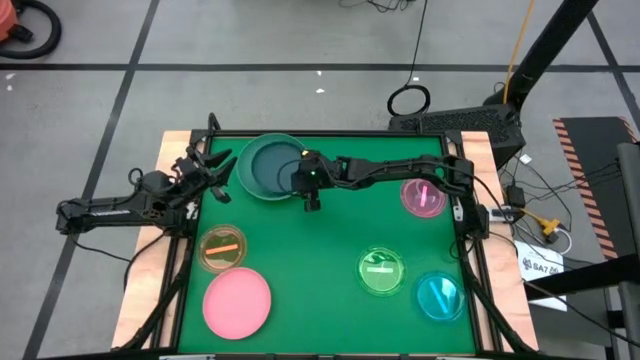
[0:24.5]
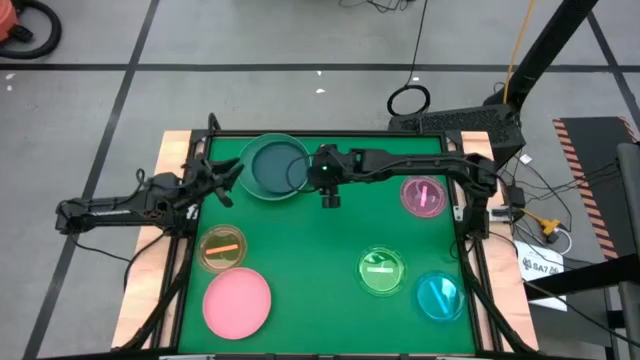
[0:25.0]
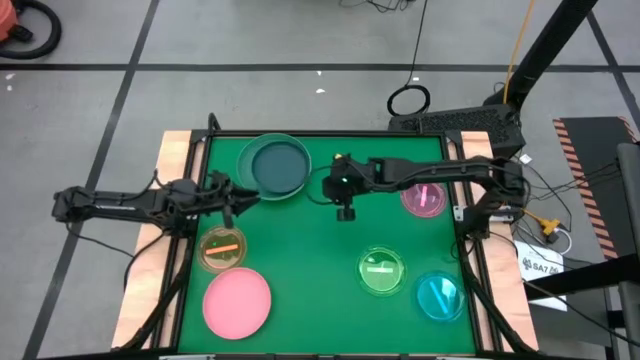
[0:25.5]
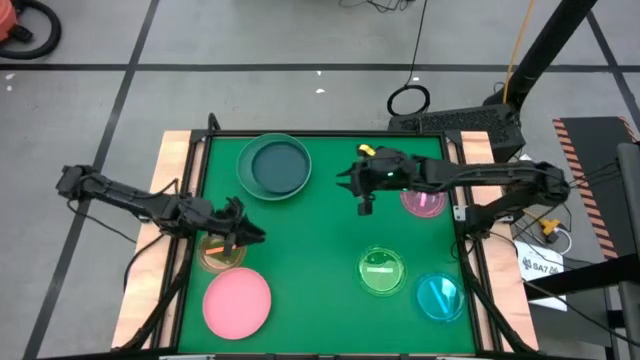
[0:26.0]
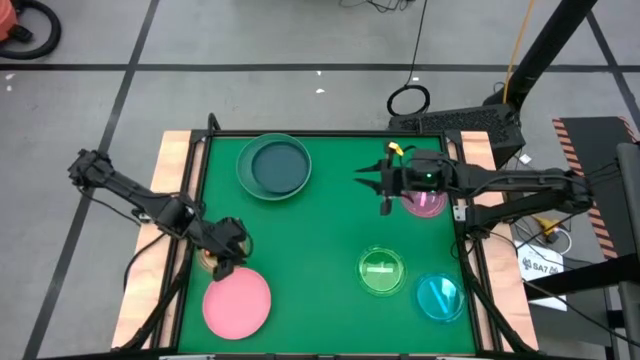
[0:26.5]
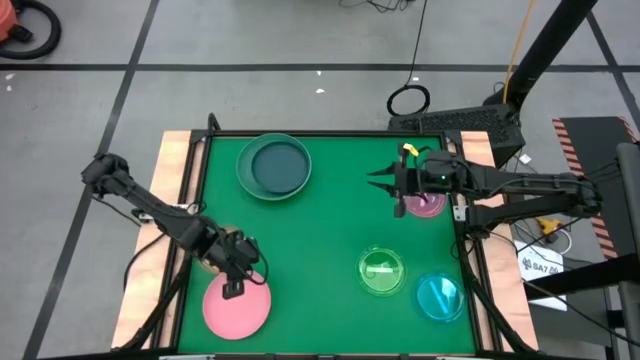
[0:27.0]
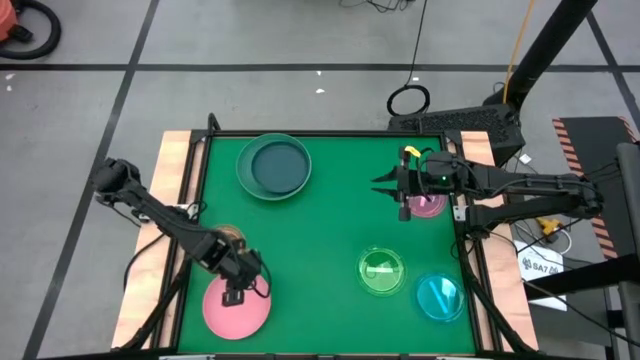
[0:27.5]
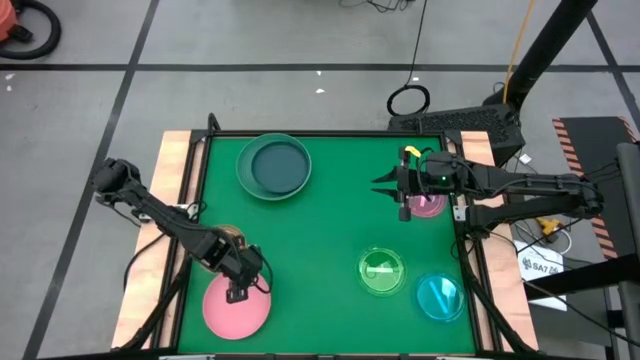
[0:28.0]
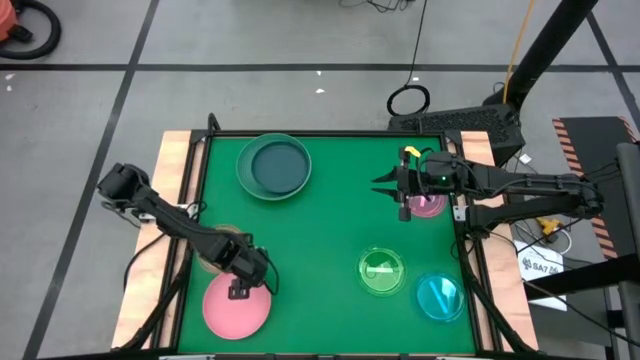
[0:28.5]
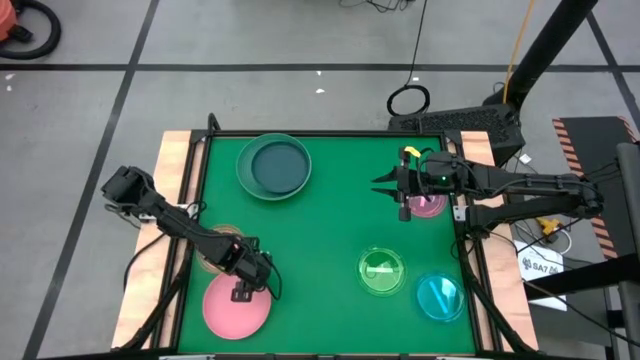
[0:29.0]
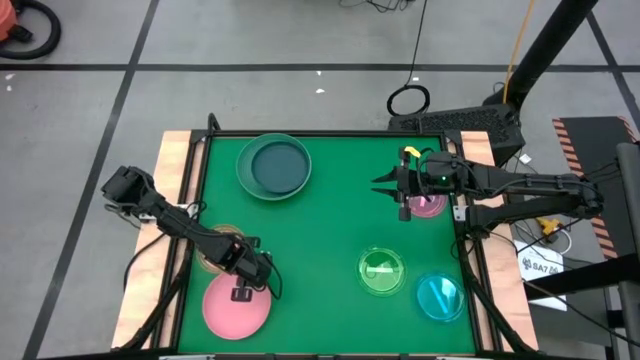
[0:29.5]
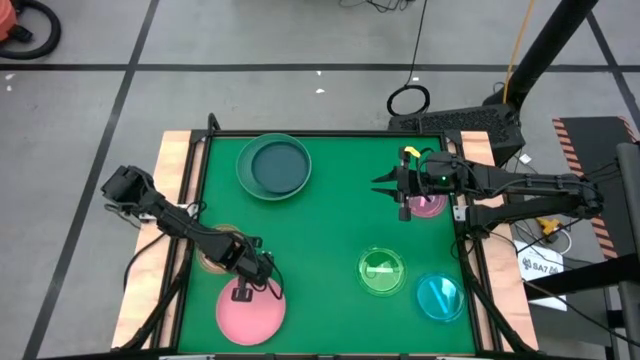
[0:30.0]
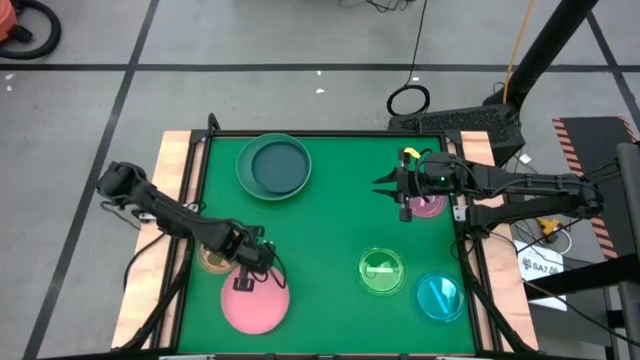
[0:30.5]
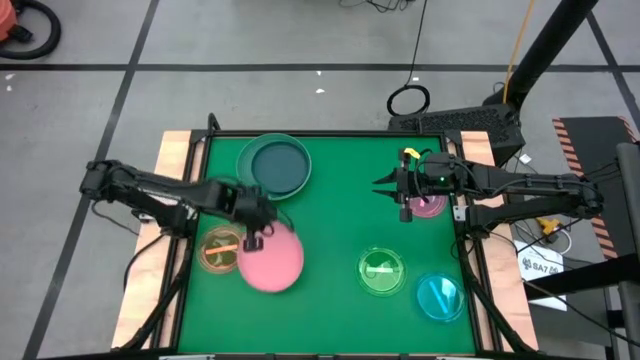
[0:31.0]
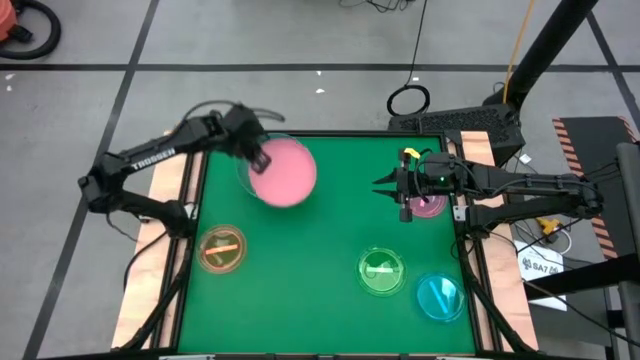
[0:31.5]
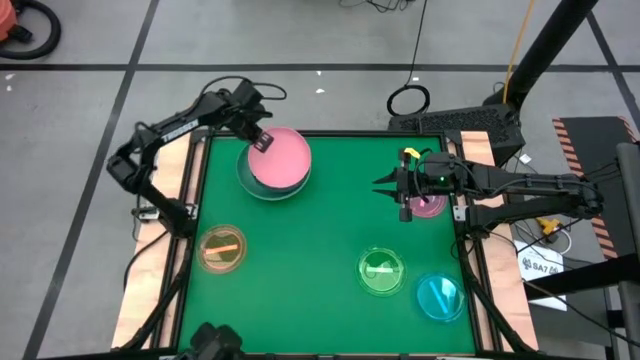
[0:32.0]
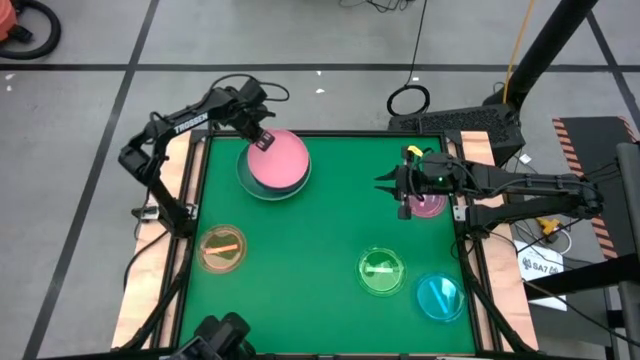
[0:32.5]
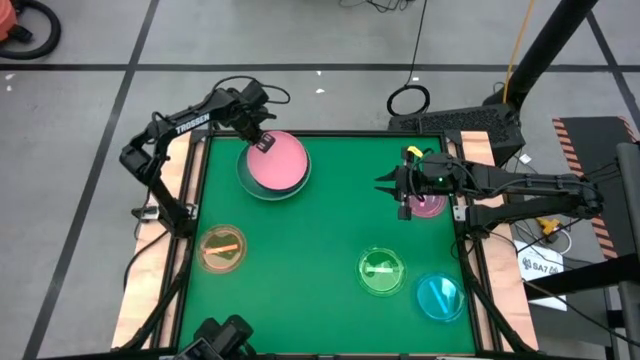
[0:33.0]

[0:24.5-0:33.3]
Task: Stack plastic plates
Stack the dark pink plate on top of the dark blue plate

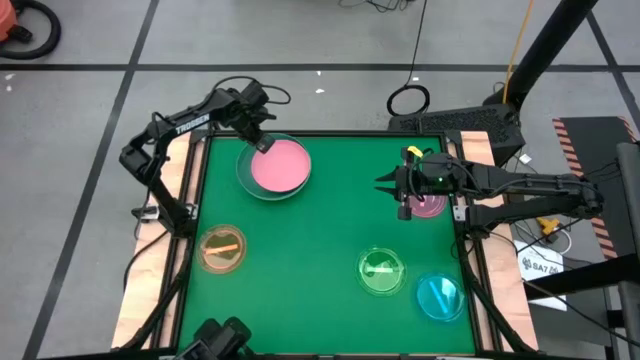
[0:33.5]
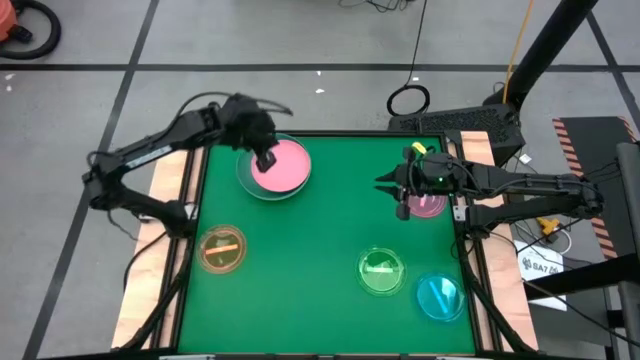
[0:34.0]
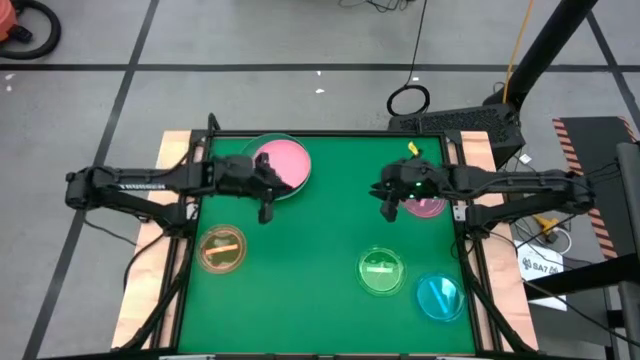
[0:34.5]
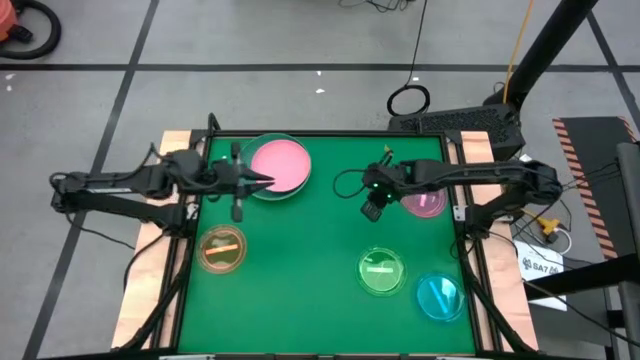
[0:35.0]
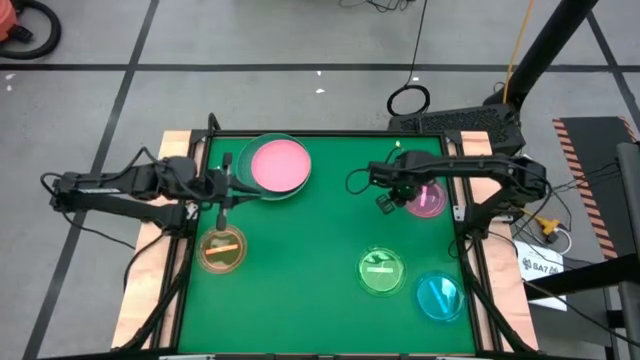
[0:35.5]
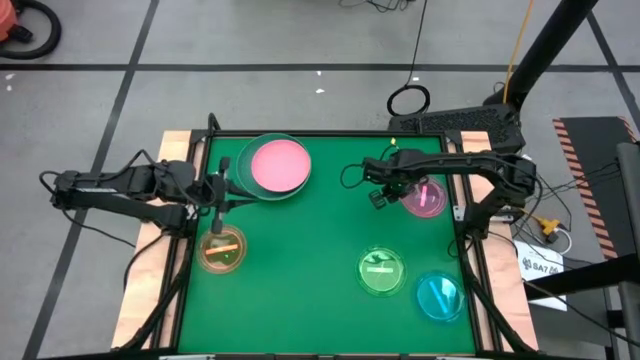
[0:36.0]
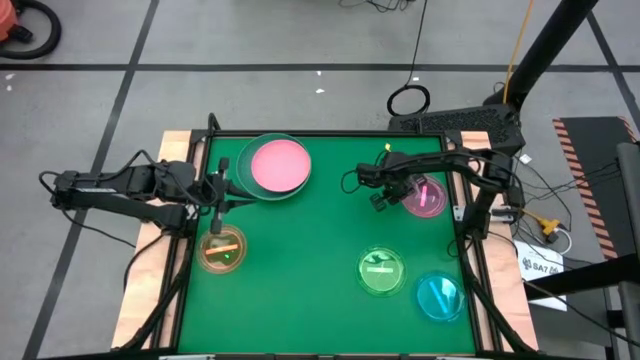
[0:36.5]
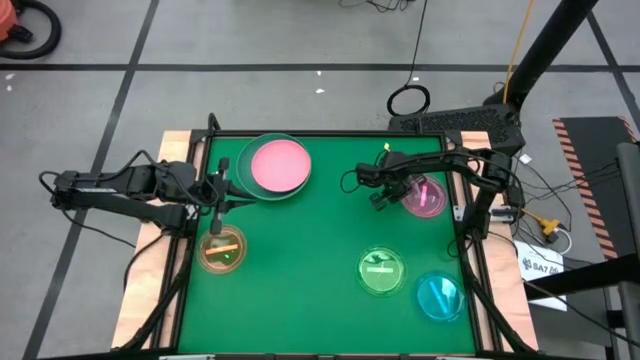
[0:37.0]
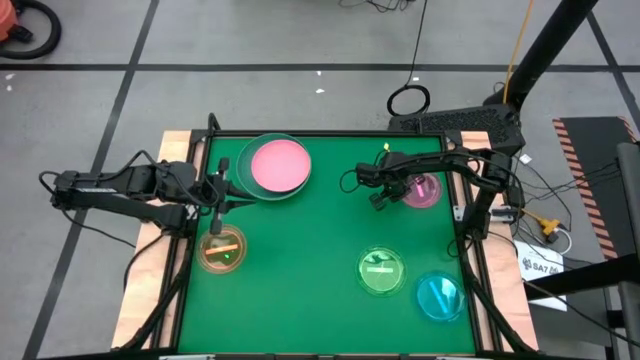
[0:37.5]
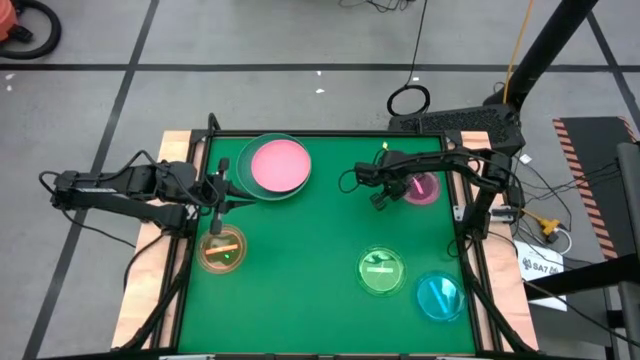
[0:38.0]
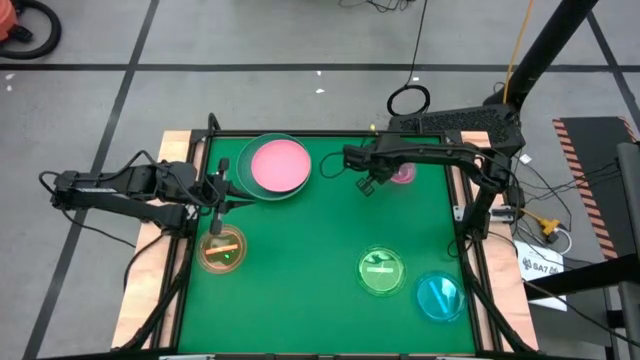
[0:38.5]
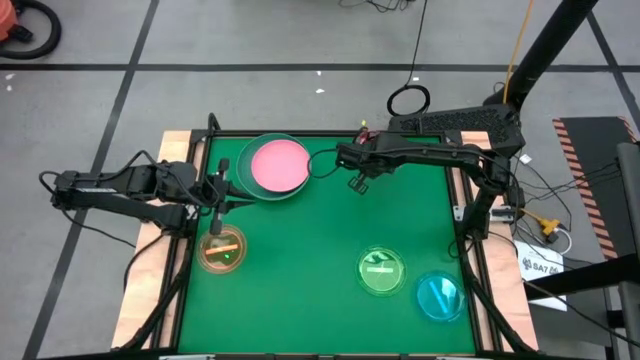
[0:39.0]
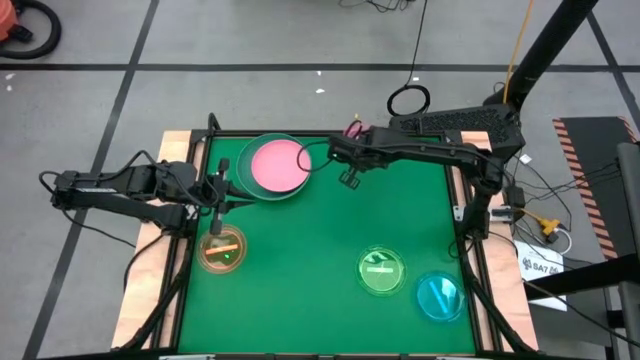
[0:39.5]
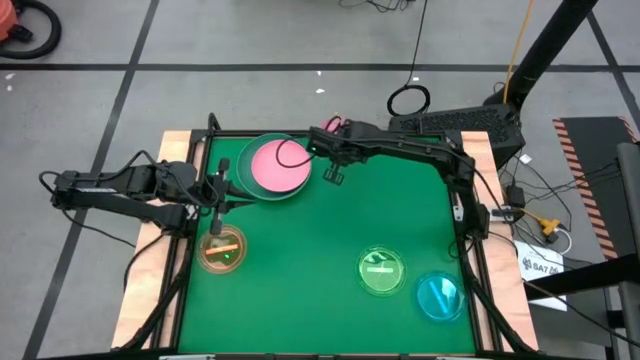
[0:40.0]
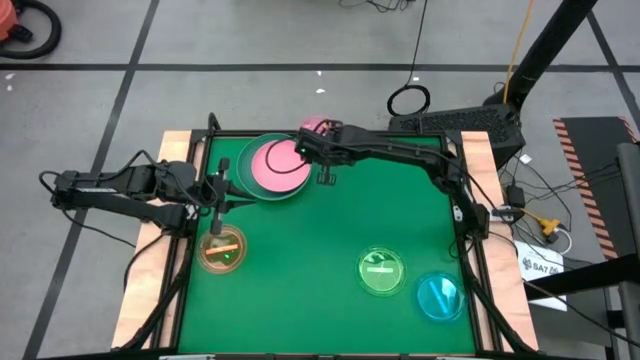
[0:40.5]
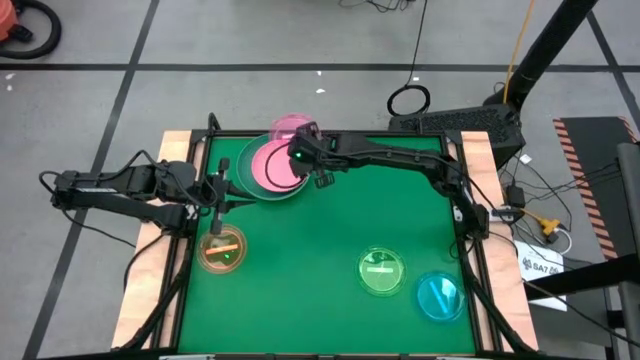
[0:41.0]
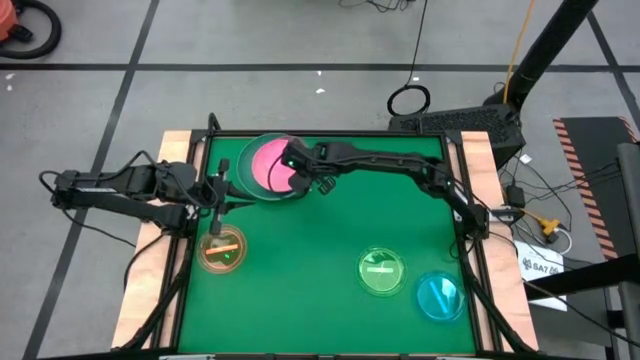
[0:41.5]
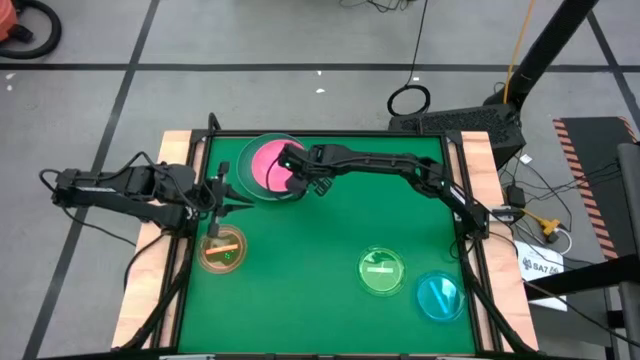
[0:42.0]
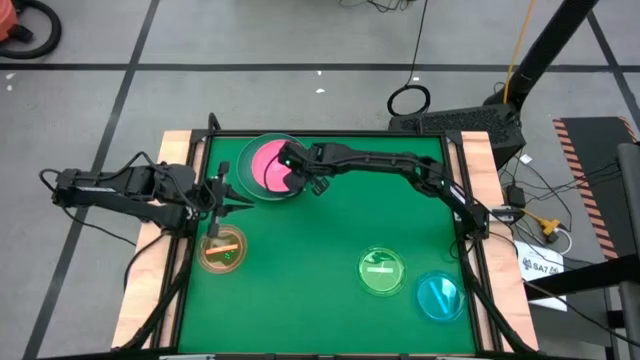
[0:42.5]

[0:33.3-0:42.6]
Stack the pink plate on top of the dark pink plate

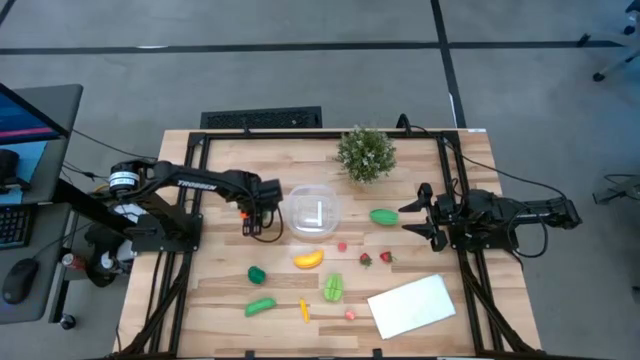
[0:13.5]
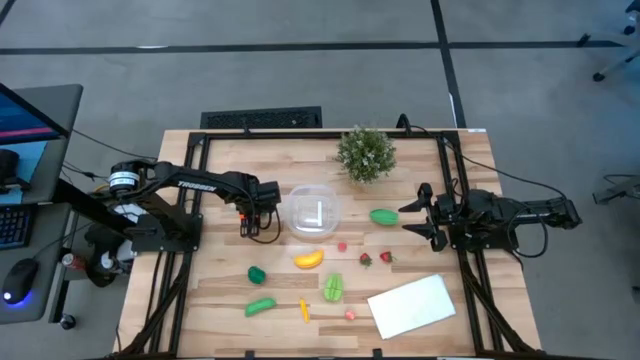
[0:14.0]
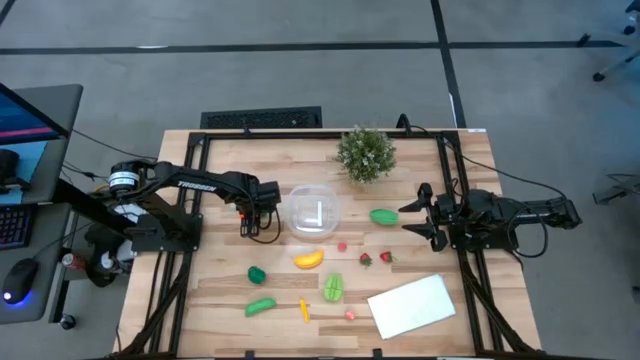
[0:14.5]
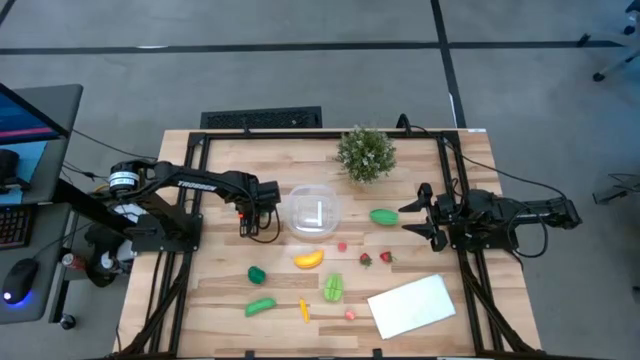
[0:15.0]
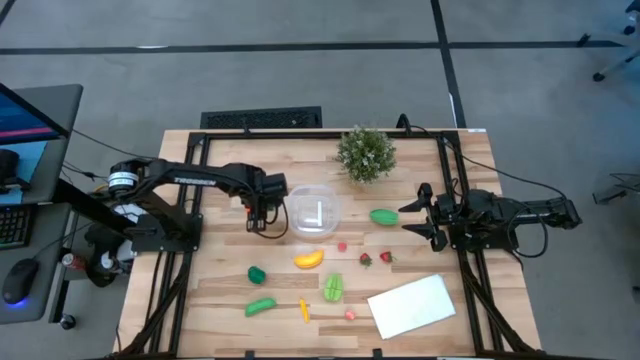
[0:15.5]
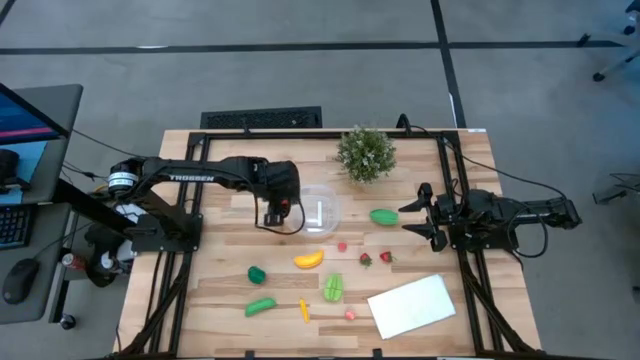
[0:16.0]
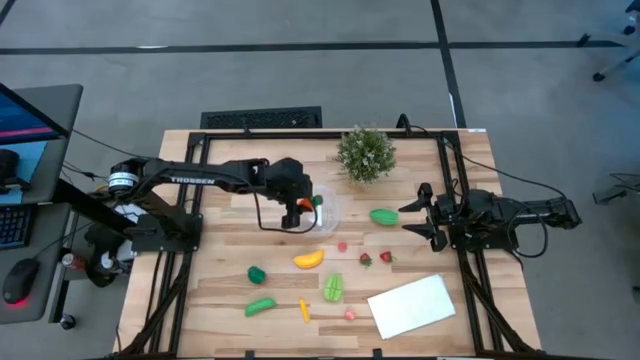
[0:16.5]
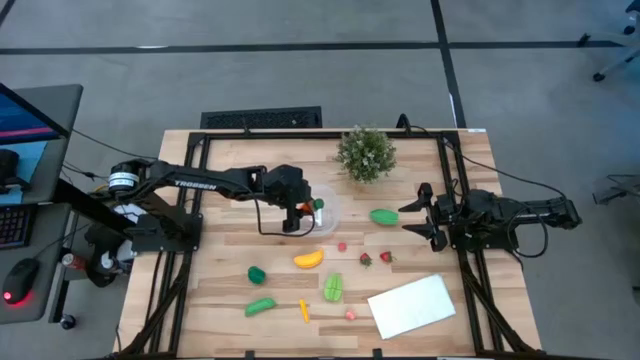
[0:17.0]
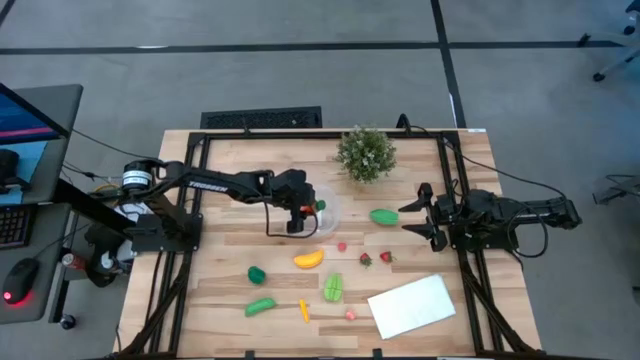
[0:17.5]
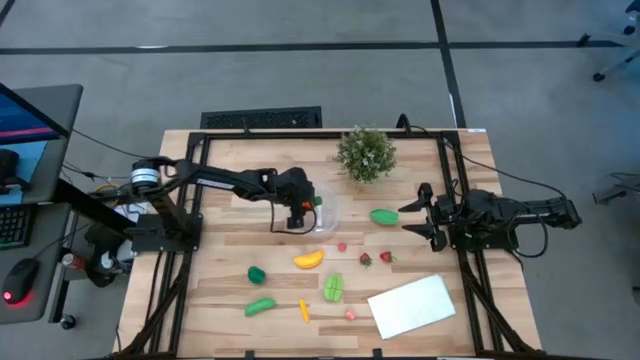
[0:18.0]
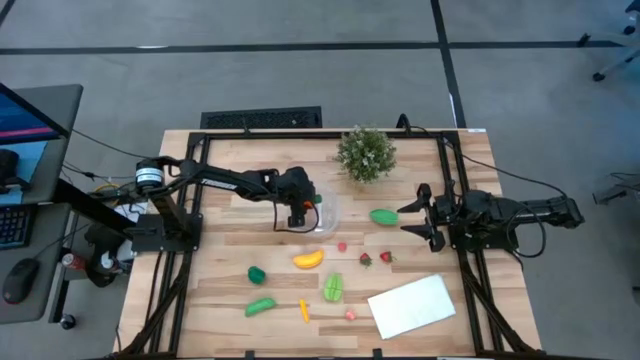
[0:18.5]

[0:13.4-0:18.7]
Task: Pick and placing Produce into tupperware
Put the orange carrot into the transparent container
